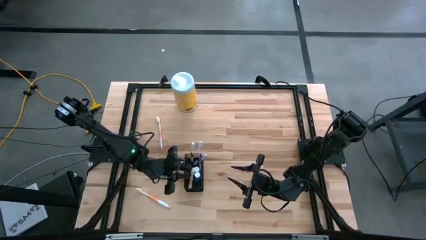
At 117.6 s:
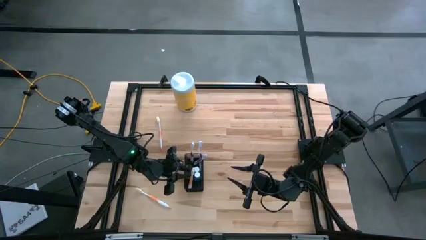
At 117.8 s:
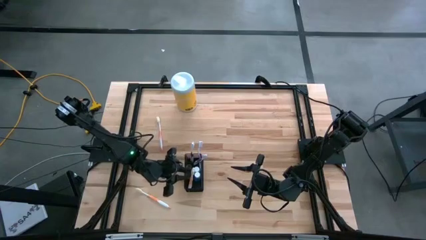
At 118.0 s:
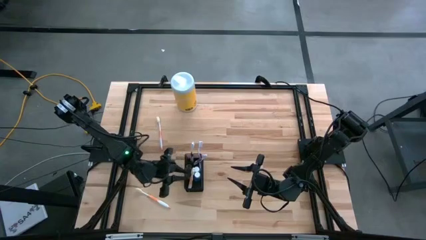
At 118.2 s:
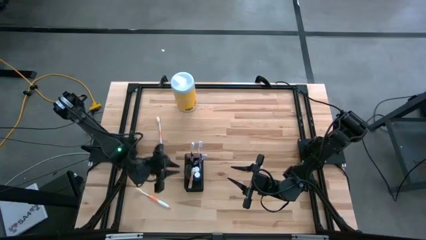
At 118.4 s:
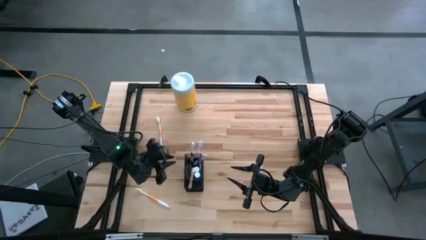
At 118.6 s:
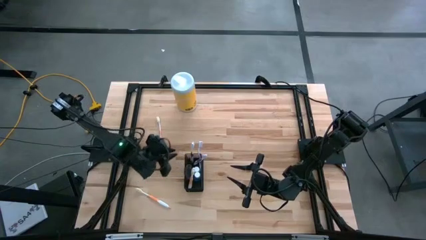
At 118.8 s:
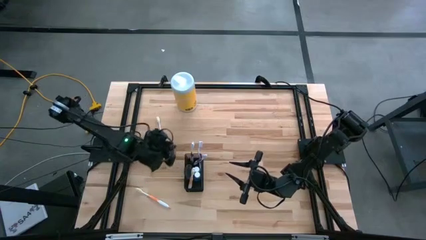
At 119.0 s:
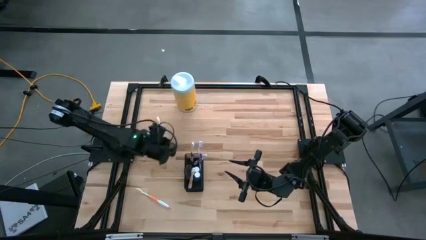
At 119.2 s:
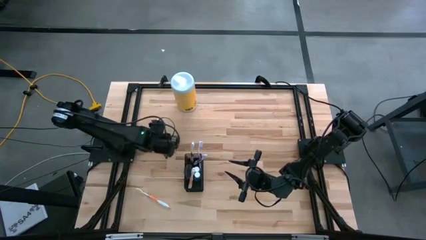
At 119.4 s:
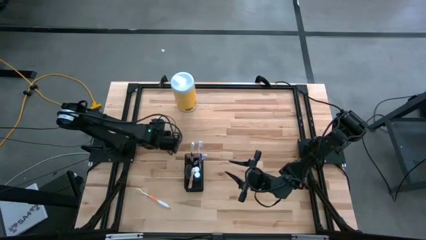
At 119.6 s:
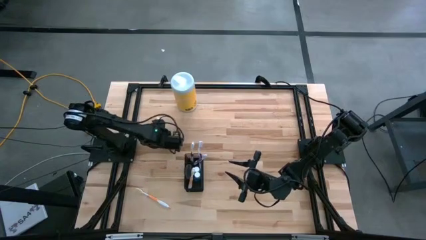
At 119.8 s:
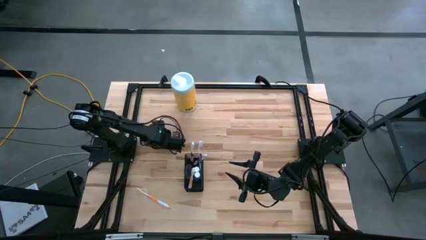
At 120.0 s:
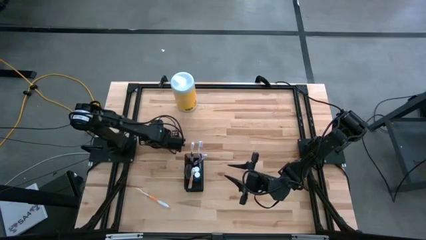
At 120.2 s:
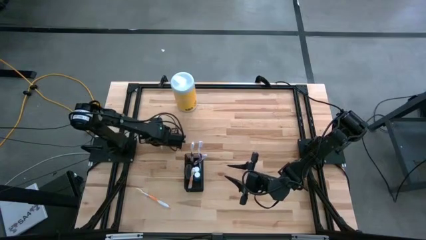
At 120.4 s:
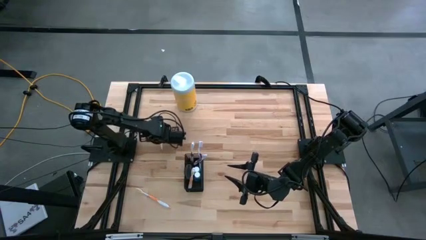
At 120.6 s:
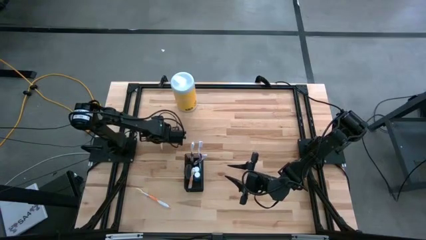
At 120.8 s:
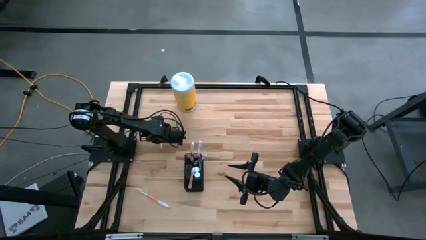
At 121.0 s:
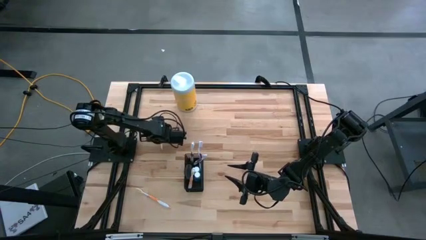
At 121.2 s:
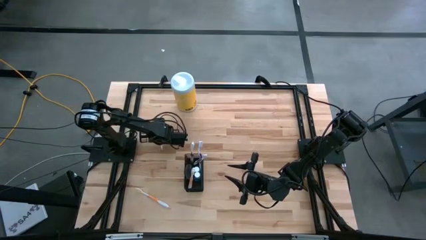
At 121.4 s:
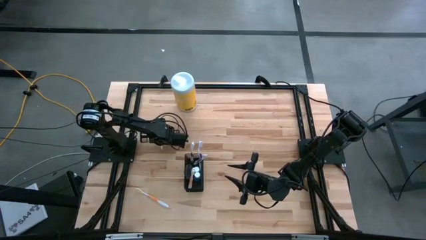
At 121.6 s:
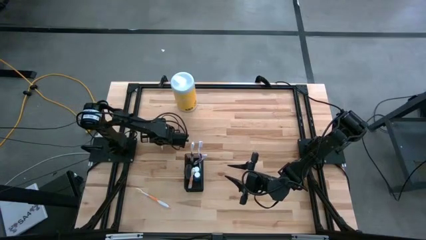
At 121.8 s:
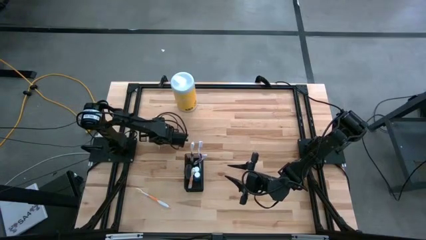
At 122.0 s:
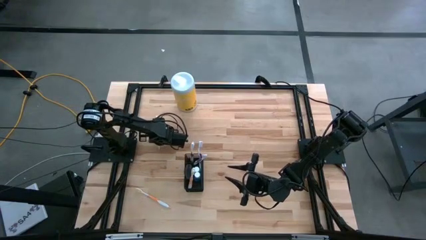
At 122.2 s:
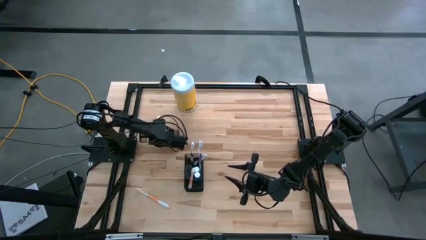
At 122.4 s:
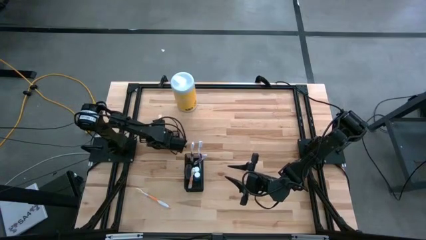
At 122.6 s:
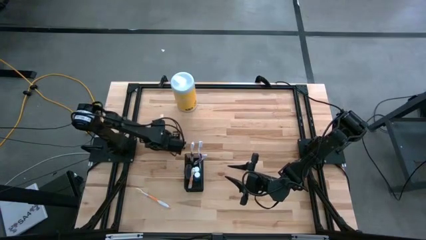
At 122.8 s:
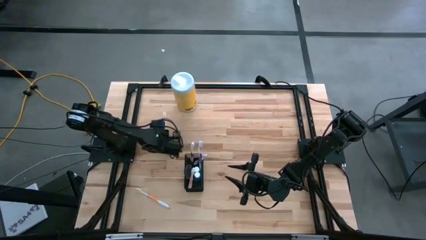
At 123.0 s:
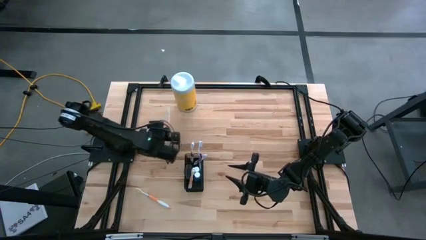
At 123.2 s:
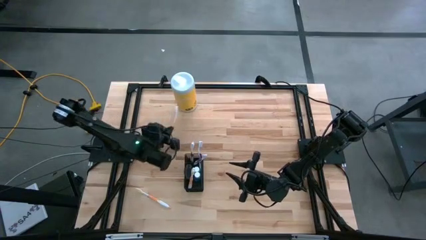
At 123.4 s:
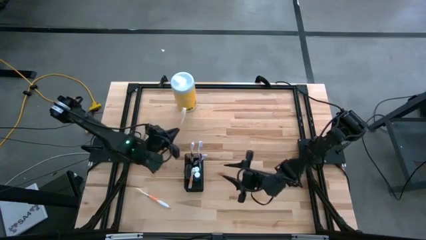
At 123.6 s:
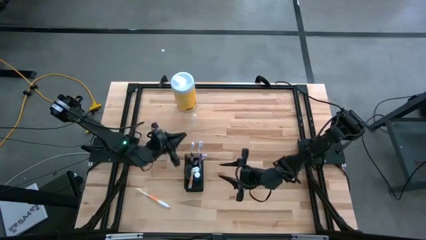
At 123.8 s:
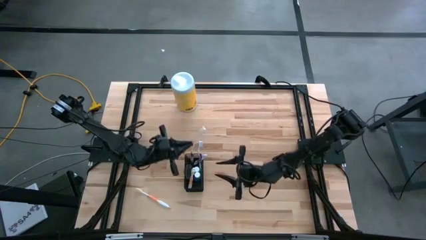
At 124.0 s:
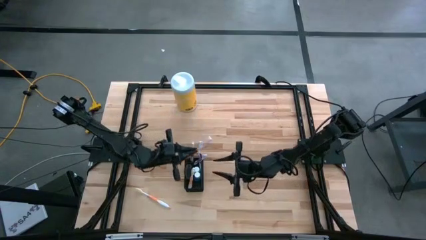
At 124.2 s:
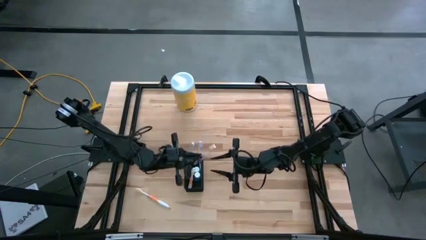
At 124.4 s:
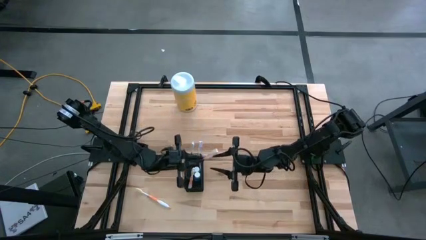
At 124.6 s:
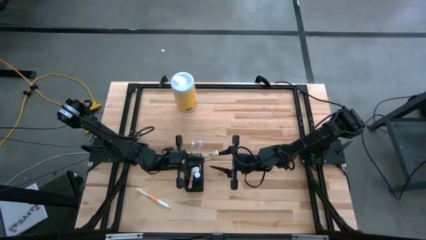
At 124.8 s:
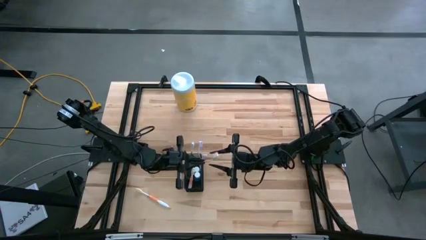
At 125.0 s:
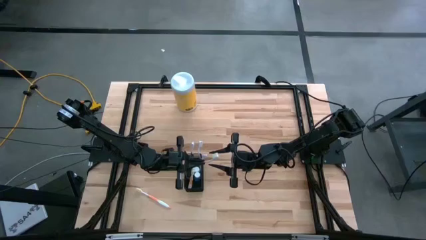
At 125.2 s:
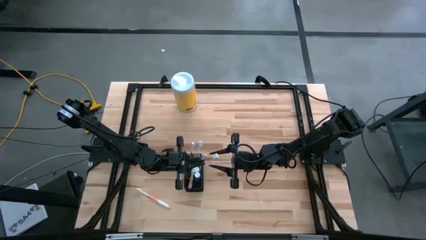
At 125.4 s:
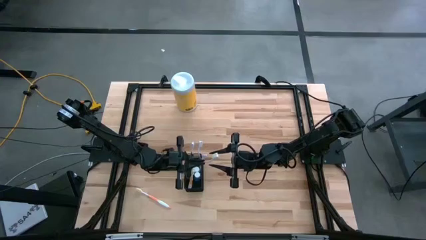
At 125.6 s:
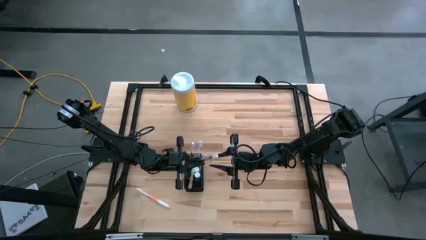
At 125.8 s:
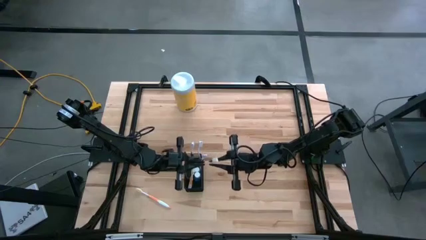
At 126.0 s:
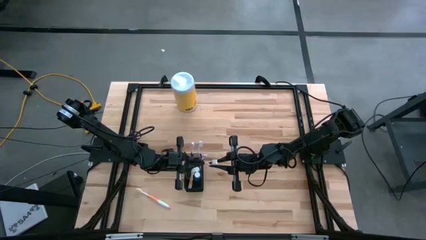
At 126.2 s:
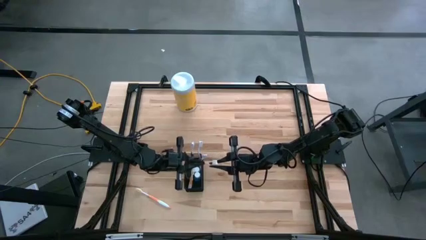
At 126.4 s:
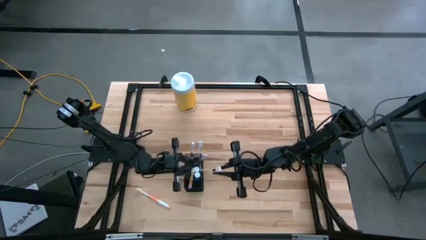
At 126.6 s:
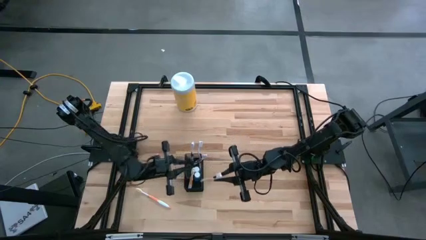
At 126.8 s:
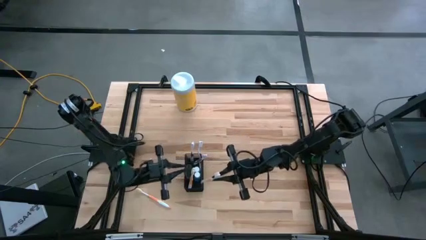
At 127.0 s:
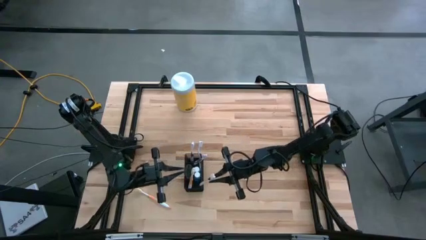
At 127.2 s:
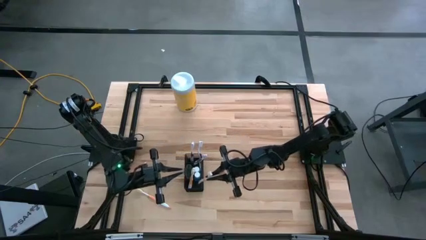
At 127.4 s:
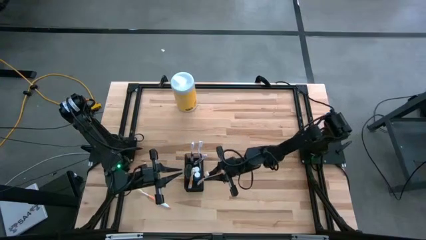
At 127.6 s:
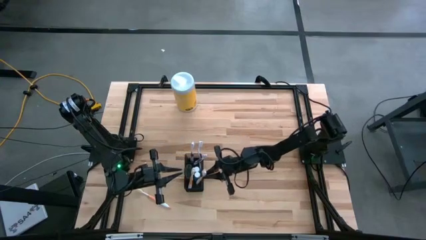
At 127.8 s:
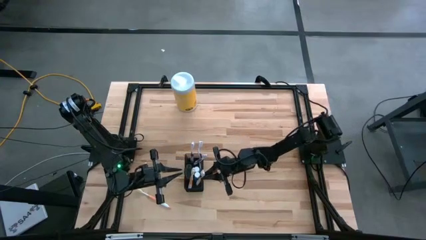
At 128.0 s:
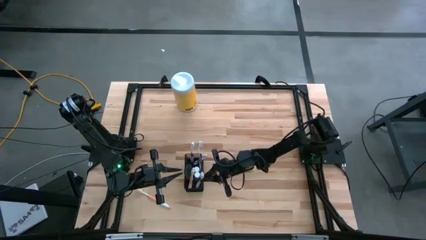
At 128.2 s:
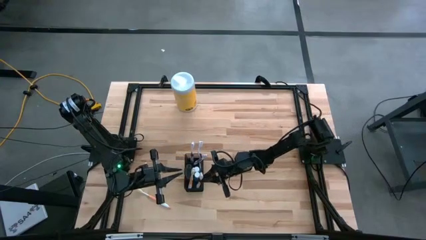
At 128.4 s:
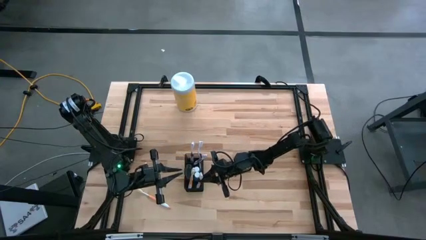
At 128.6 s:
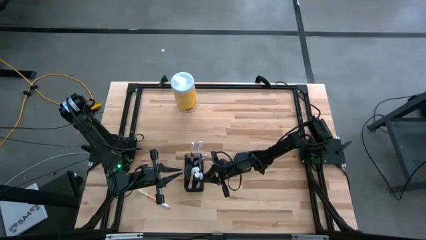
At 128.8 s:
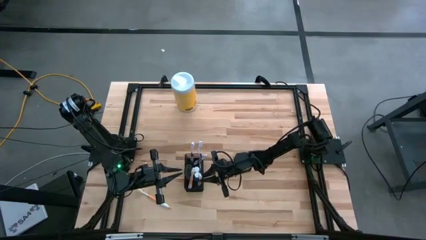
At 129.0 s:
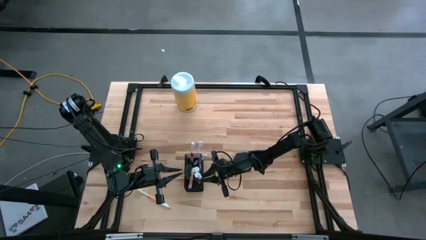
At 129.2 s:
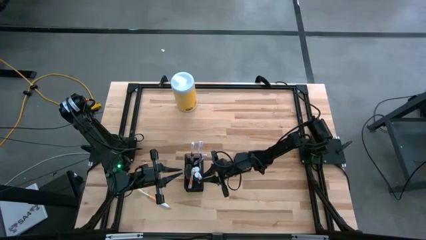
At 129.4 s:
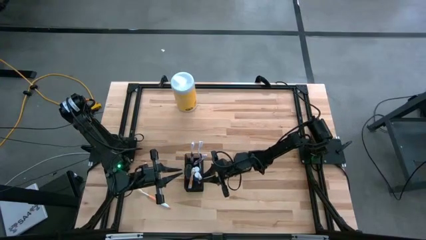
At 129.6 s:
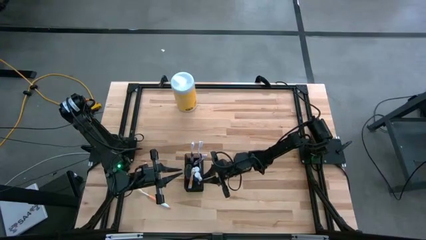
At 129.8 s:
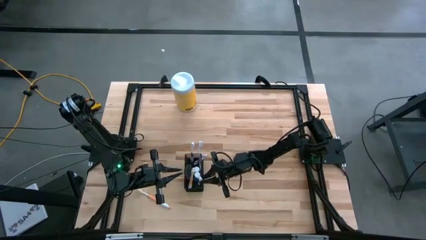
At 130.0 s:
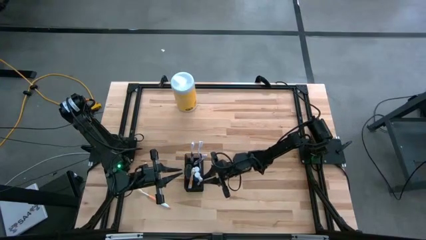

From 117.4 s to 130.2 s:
Task: Pick & Place toothbrushing station
Put the top orange toothbrush into the bottom section of the black wire organizer
